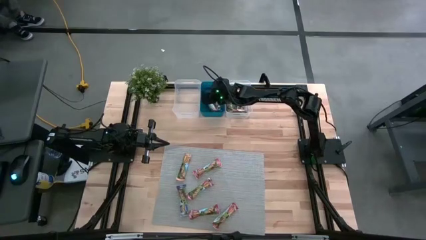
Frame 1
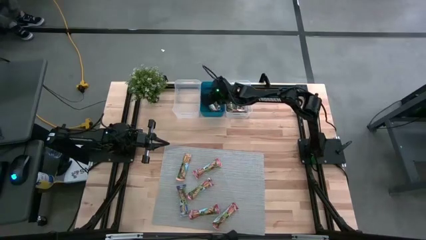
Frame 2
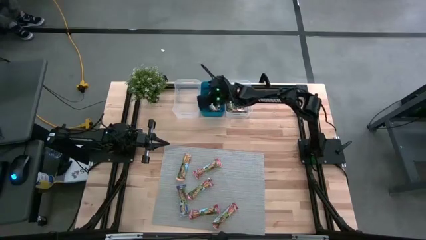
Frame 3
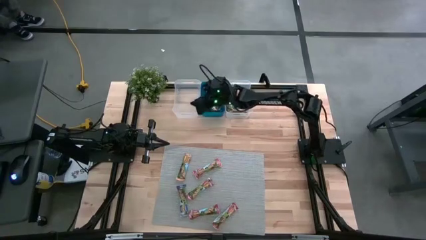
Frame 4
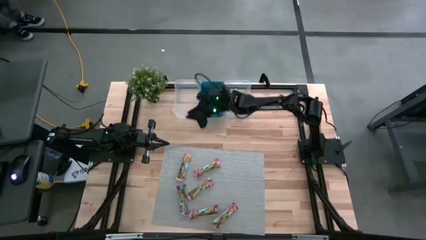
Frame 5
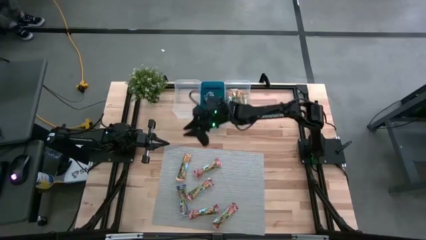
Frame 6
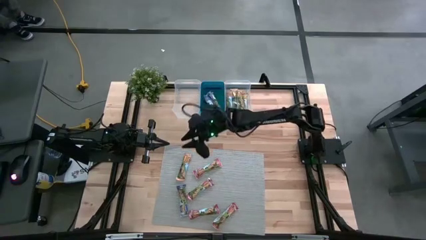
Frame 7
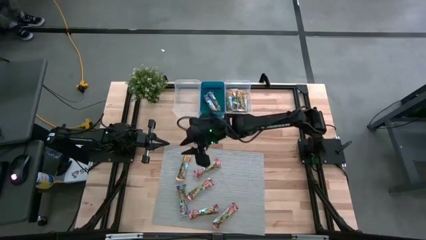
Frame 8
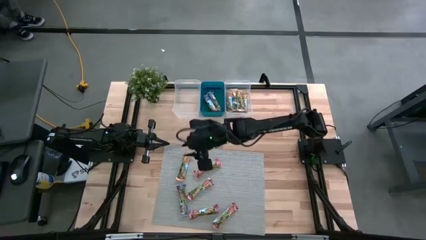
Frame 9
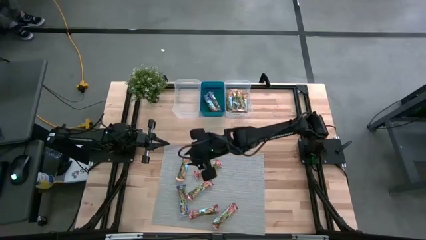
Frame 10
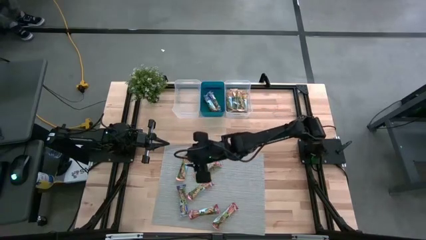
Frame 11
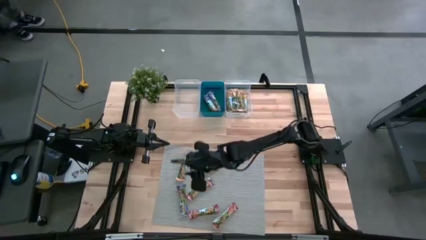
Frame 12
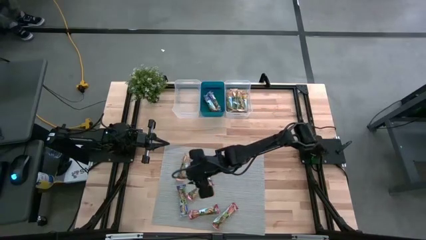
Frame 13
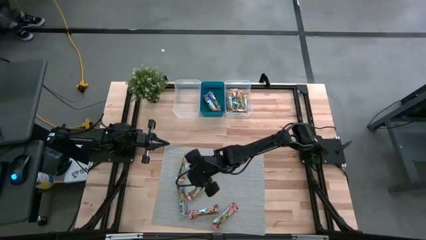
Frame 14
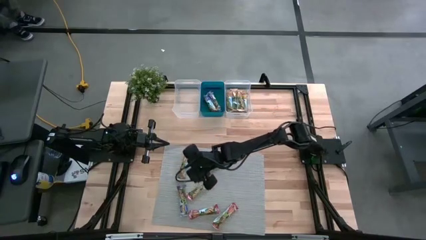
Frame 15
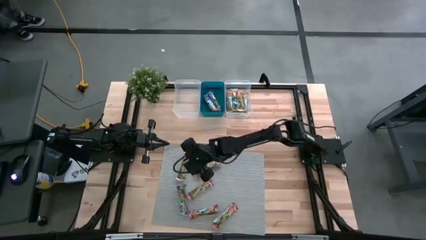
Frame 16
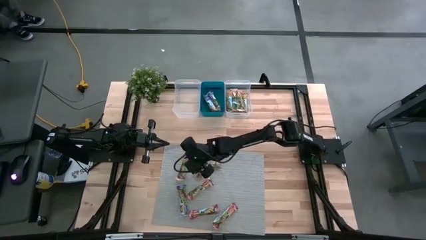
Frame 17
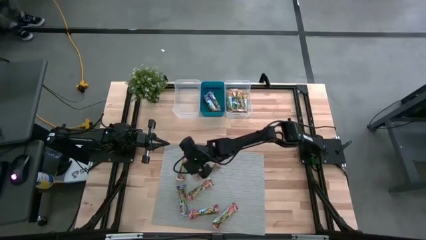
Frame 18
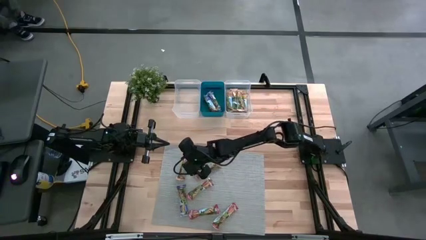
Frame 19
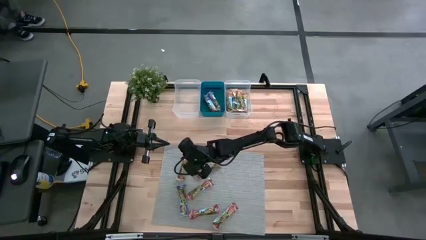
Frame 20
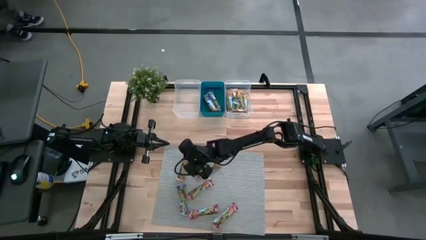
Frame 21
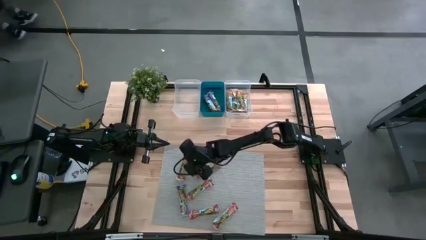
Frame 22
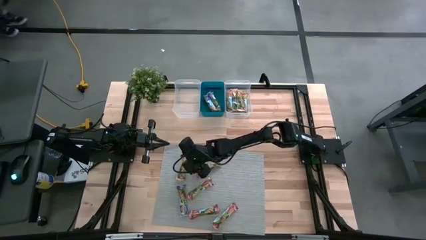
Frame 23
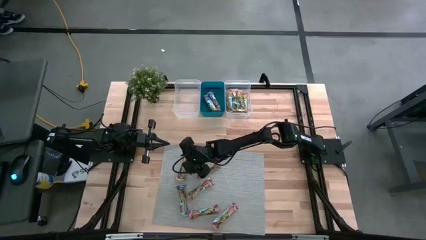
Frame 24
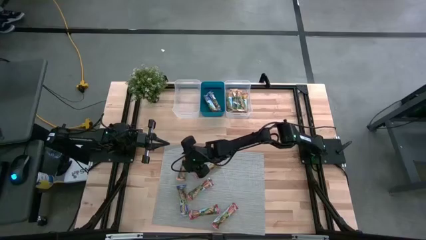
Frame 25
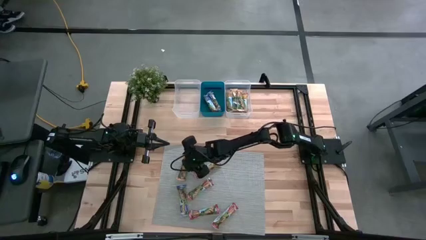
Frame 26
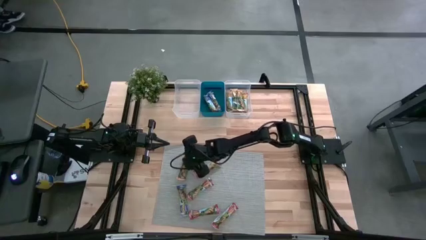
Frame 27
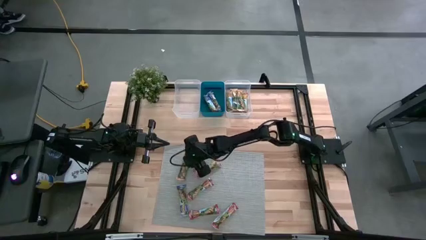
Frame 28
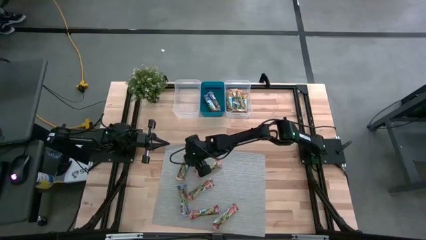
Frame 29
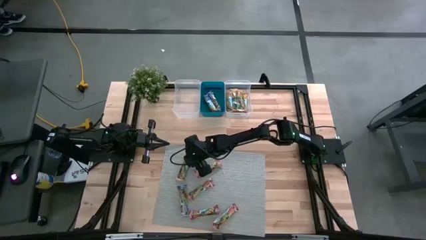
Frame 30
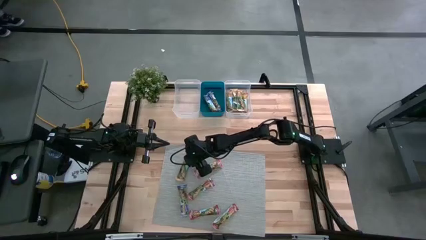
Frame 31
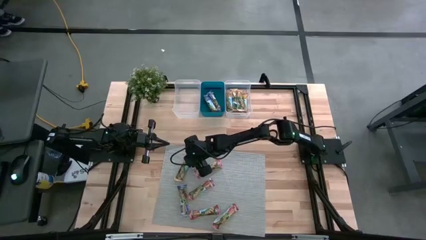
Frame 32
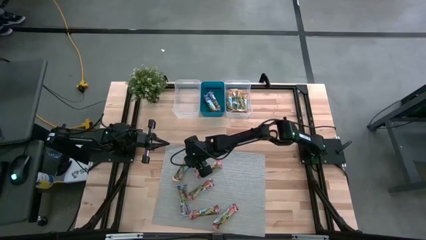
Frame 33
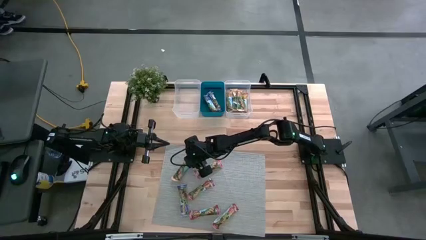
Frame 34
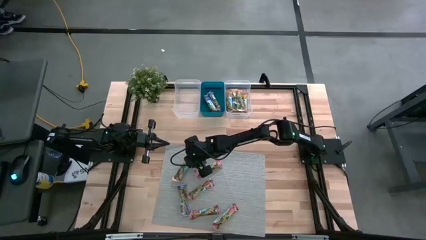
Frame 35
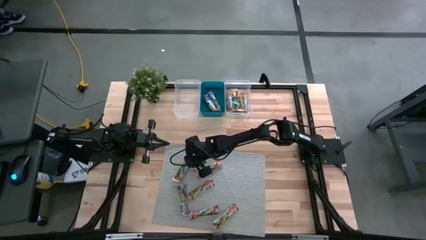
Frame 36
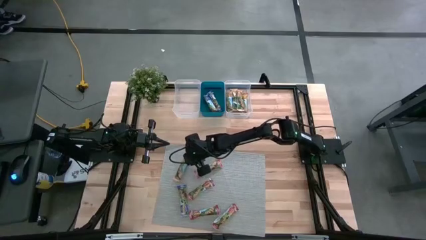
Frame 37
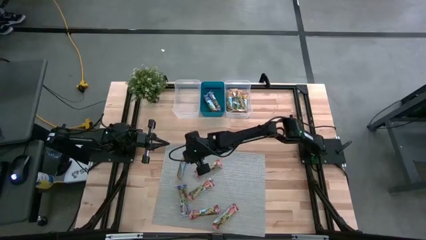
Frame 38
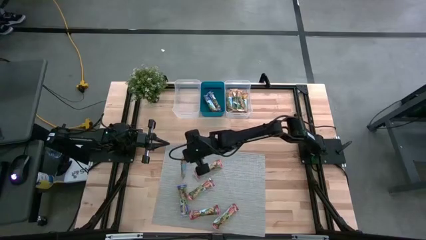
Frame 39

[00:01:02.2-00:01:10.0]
Task: Pick and place Granola Bars by type
Put the orange granola bar into the right transparent bin

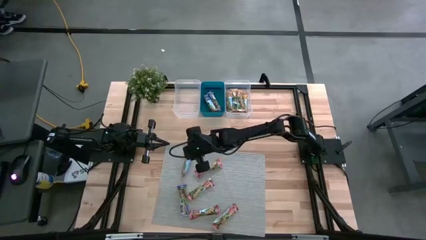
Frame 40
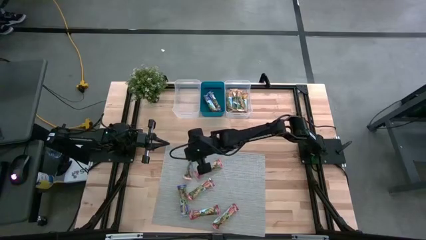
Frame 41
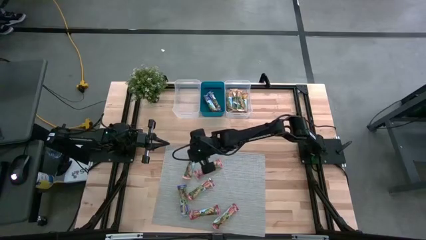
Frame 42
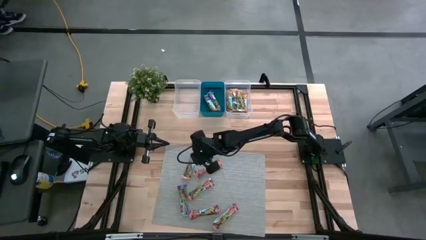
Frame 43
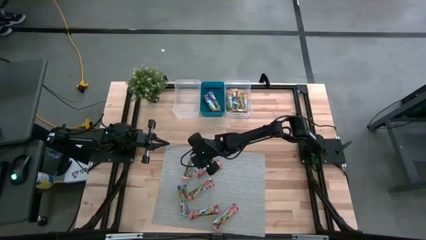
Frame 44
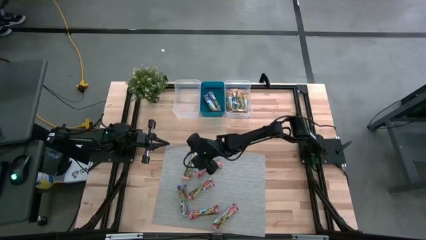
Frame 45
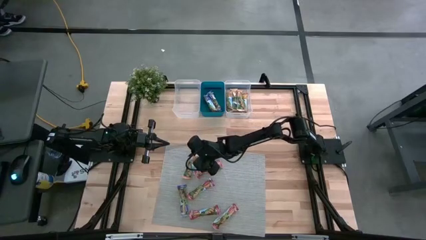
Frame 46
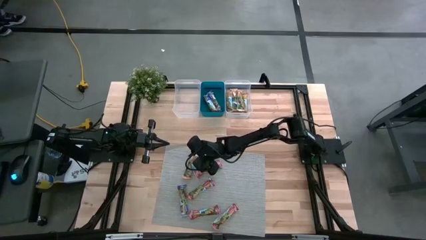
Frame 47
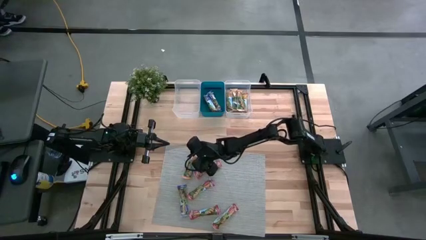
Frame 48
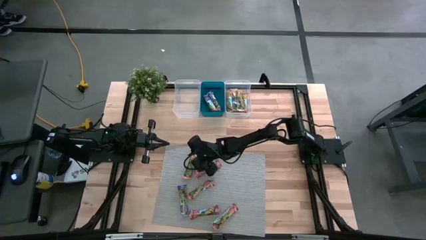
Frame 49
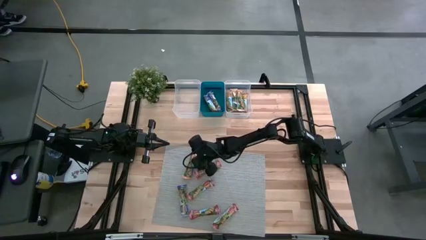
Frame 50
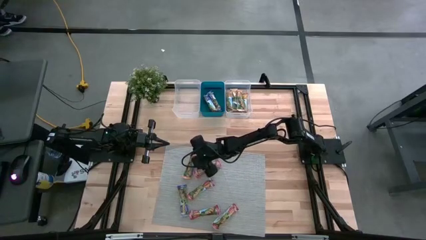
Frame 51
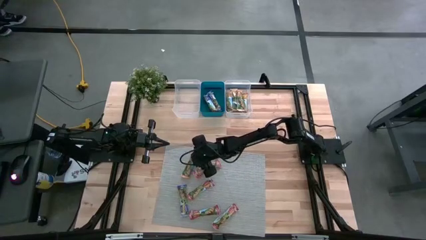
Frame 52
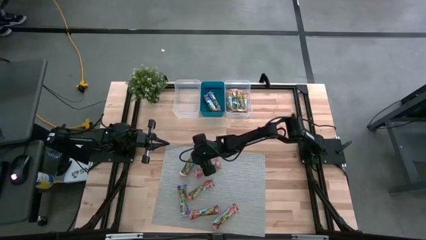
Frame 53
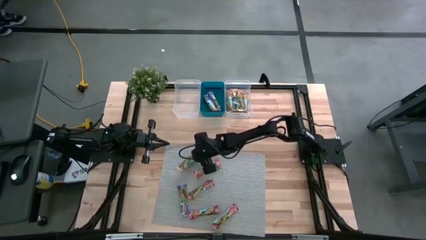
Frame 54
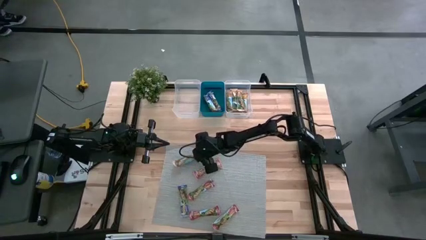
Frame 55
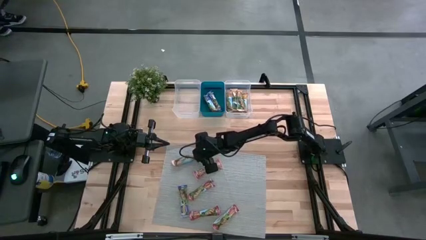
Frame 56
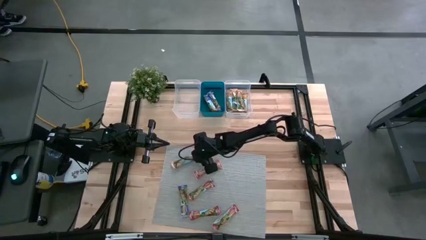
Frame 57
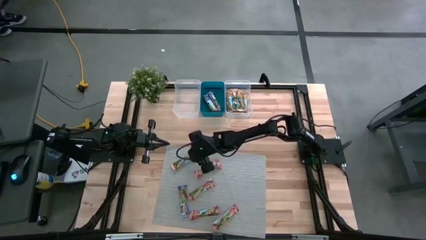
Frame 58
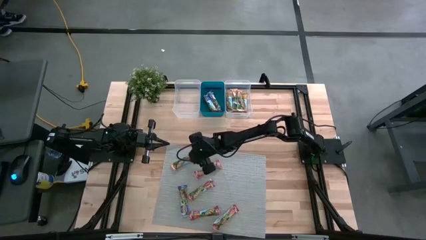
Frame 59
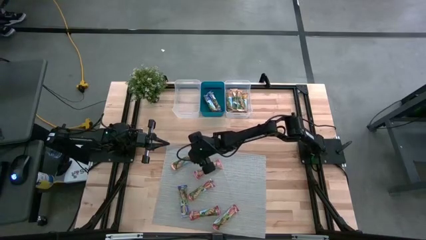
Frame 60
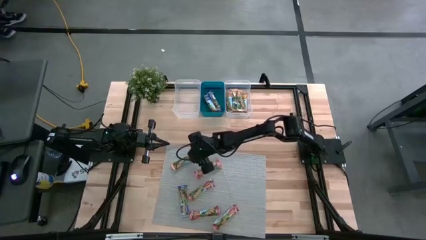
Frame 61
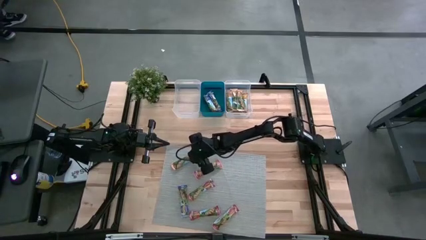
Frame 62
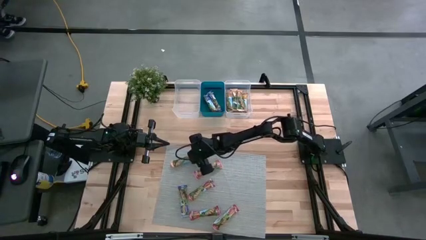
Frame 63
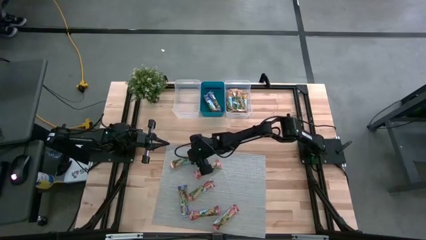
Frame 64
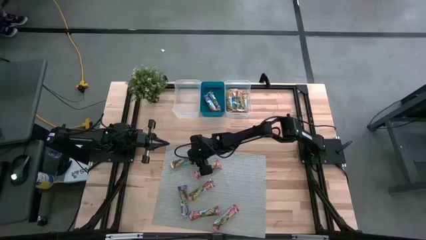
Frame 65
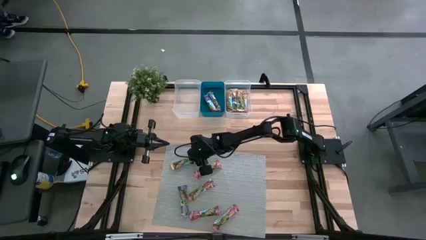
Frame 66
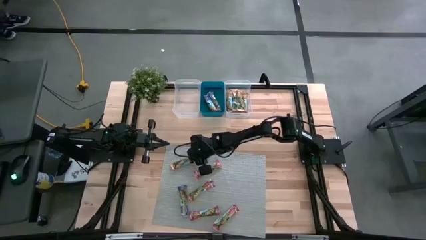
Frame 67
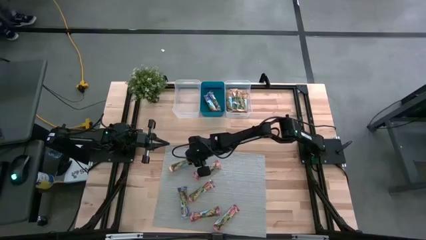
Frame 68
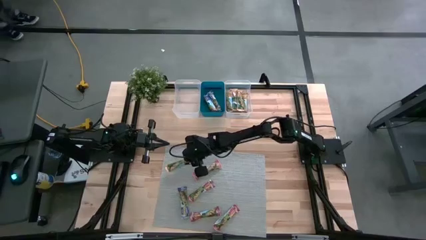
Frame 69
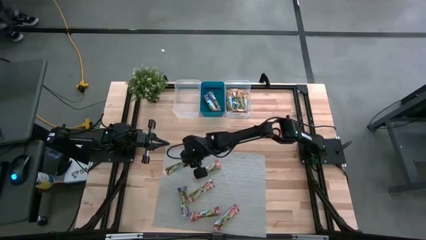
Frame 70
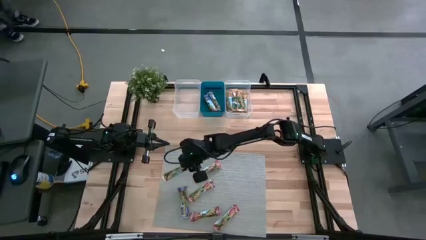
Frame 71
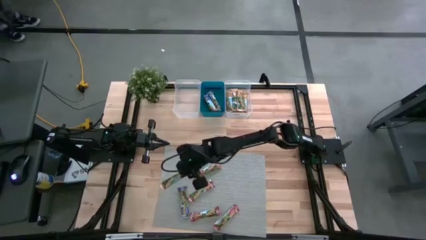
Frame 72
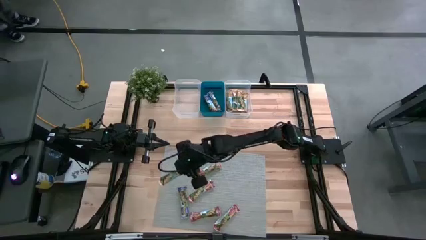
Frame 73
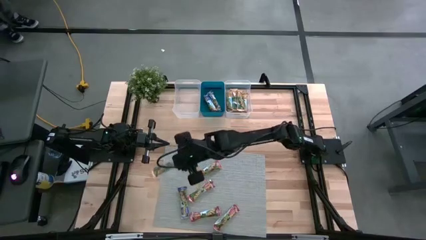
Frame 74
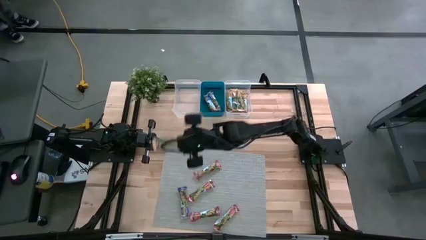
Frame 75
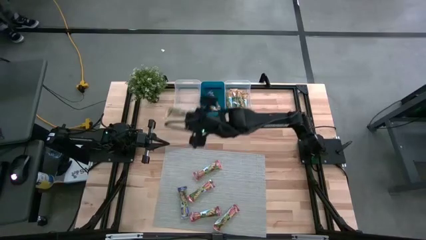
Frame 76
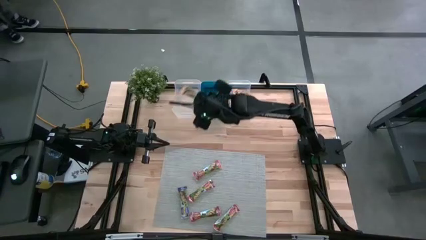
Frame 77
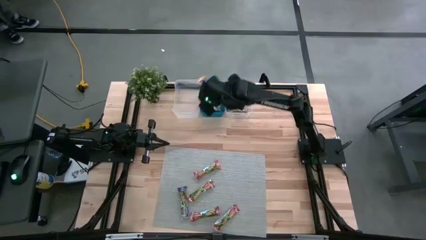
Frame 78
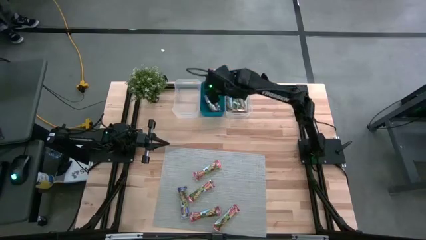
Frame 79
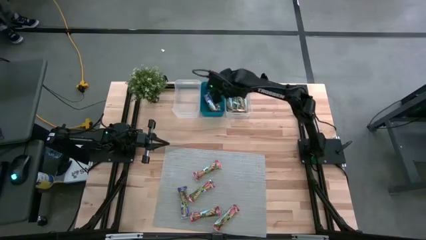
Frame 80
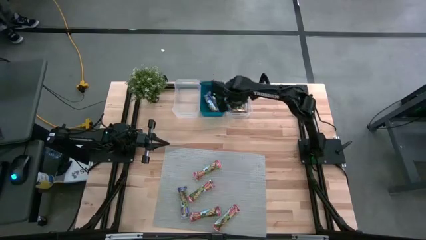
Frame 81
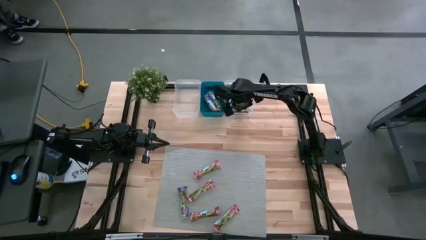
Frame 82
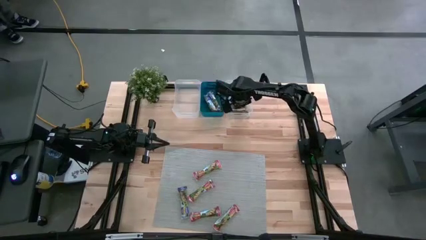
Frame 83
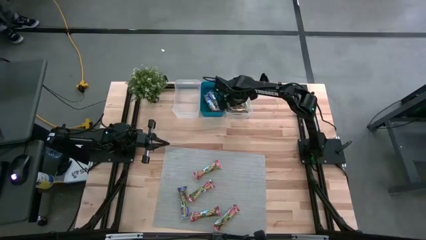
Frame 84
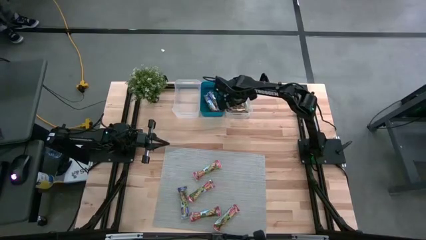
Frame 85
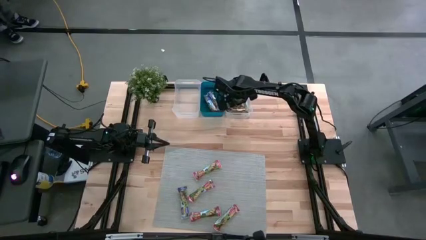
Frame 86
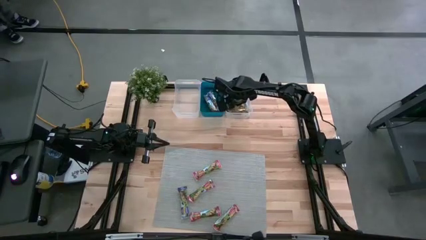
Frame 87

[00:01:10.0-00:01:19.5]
Put the orange granola bar into the right transparent bin
